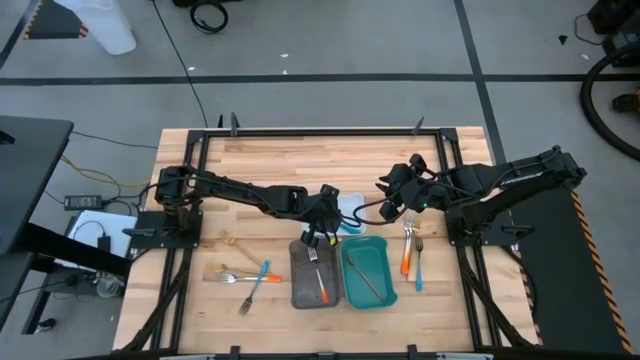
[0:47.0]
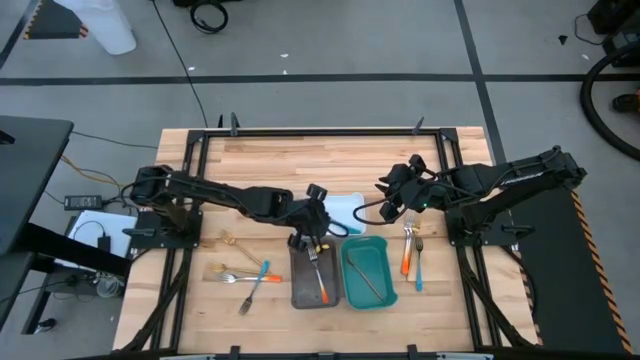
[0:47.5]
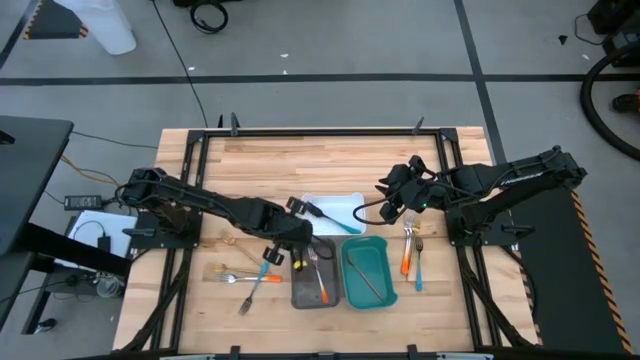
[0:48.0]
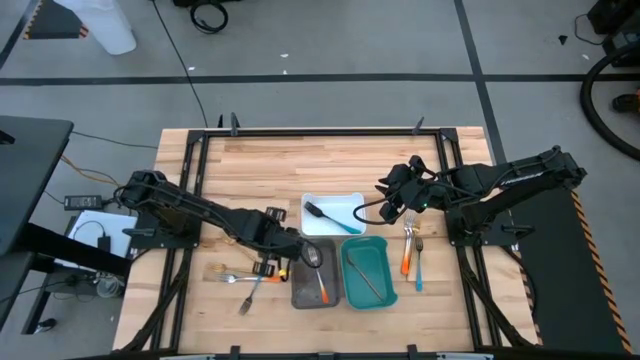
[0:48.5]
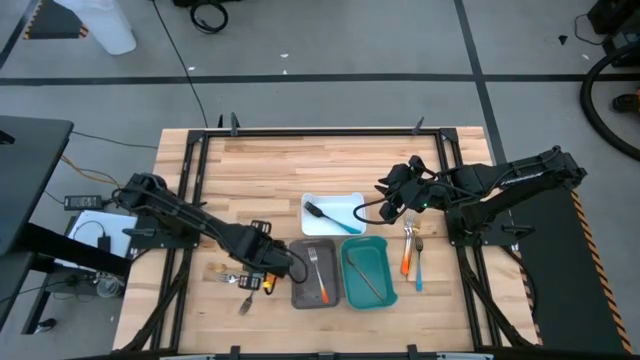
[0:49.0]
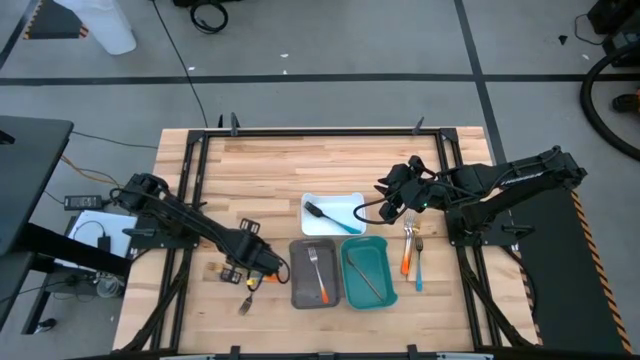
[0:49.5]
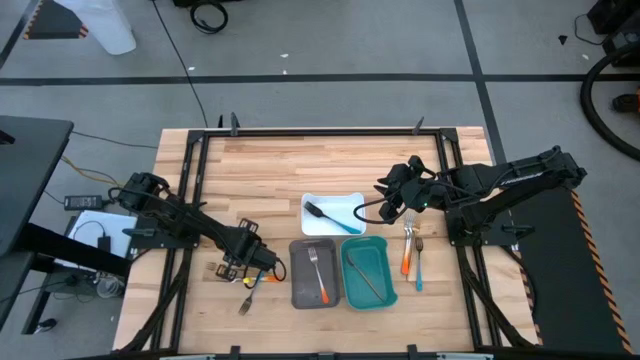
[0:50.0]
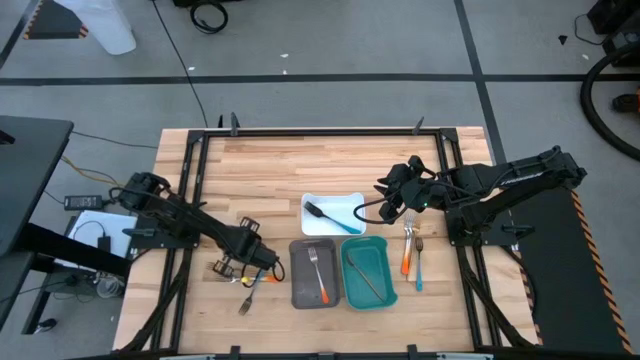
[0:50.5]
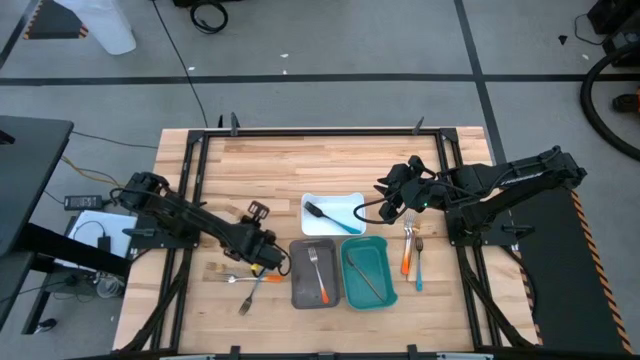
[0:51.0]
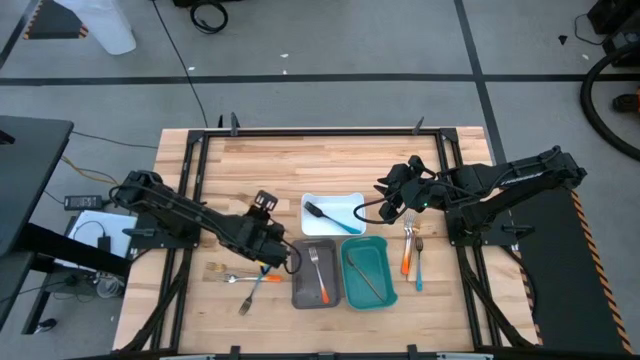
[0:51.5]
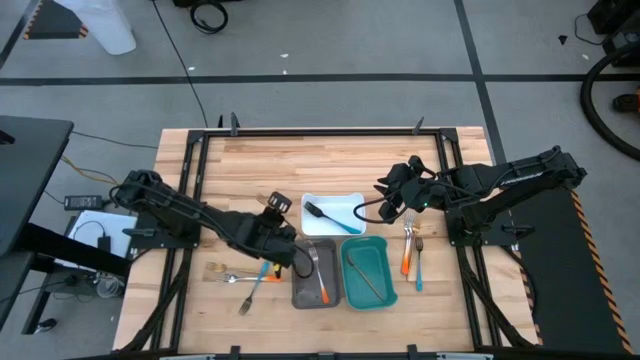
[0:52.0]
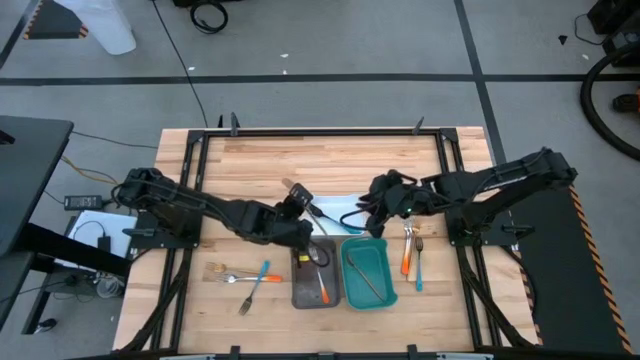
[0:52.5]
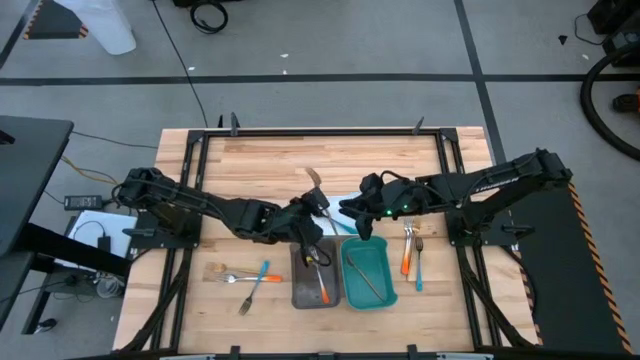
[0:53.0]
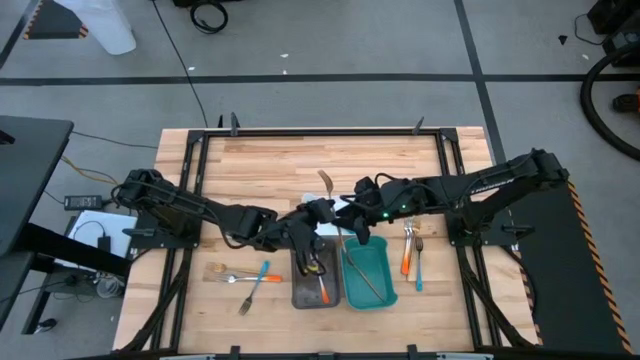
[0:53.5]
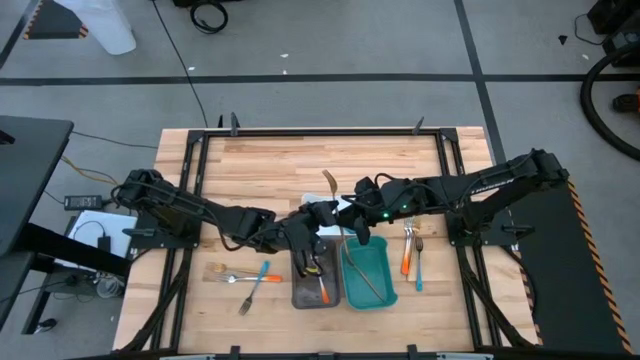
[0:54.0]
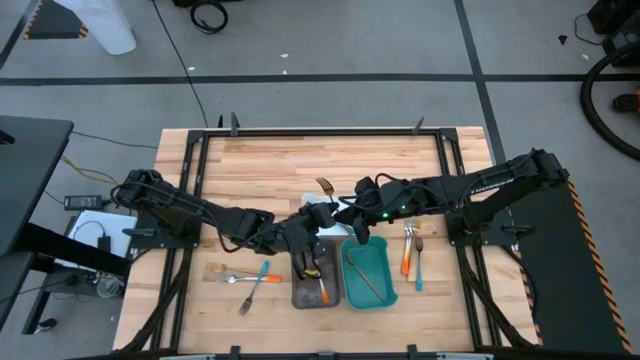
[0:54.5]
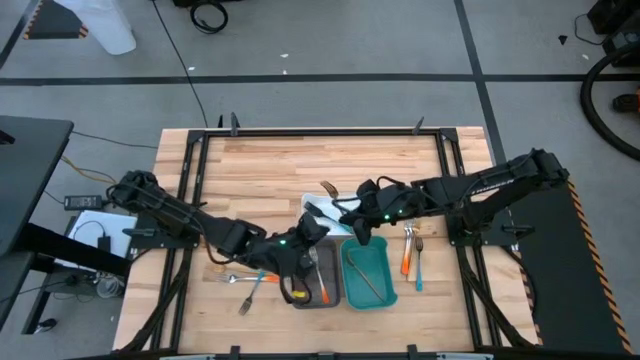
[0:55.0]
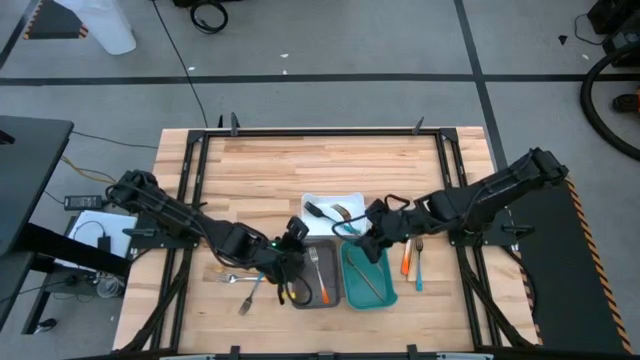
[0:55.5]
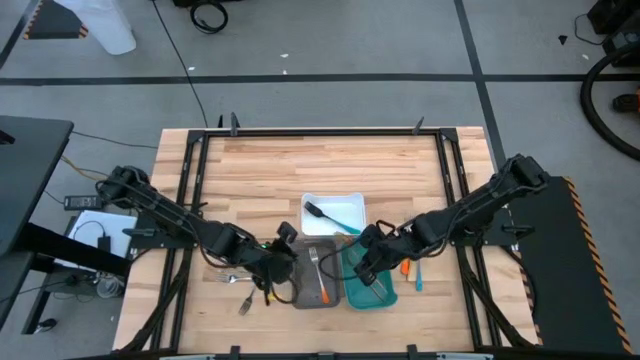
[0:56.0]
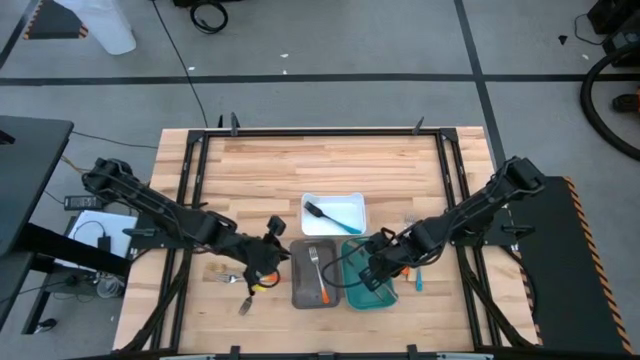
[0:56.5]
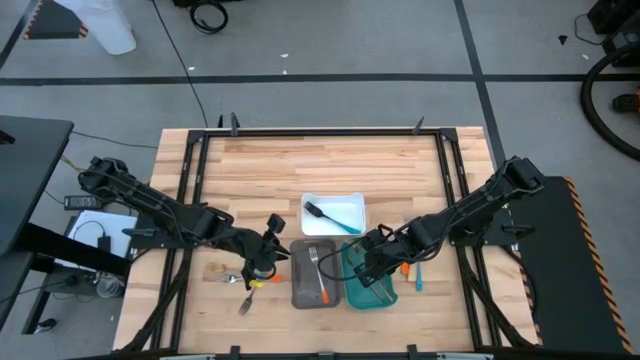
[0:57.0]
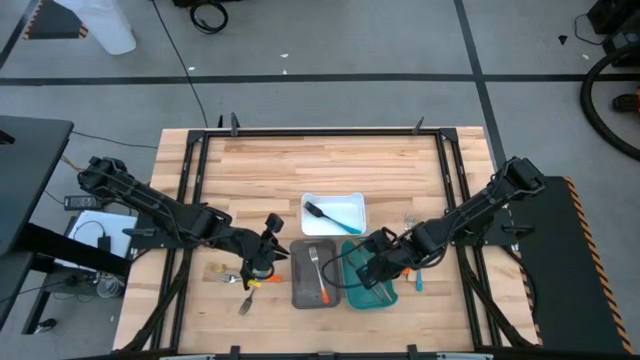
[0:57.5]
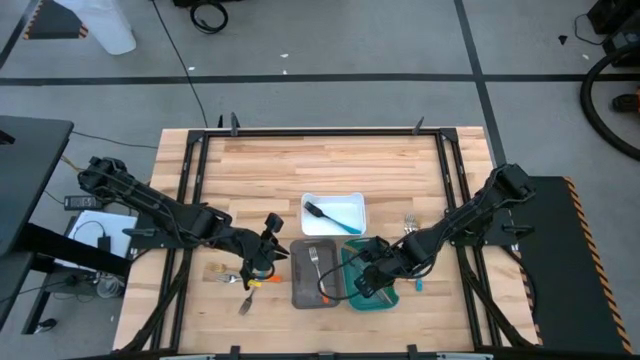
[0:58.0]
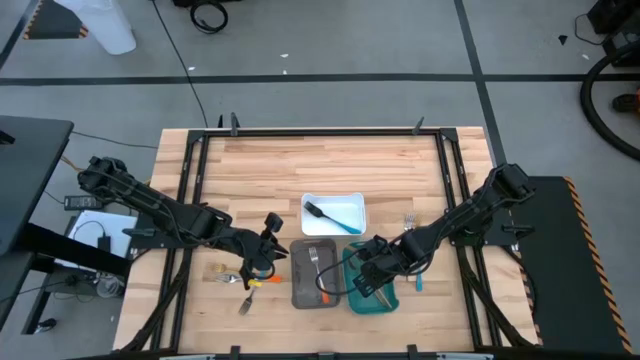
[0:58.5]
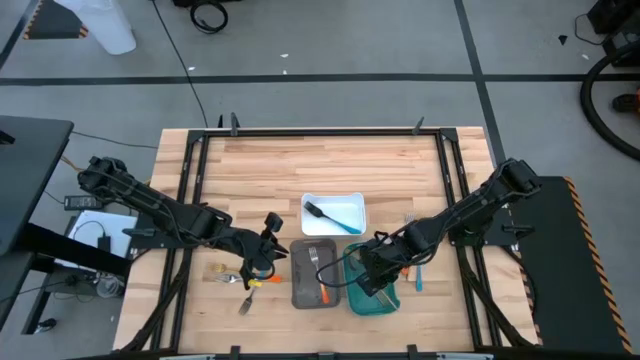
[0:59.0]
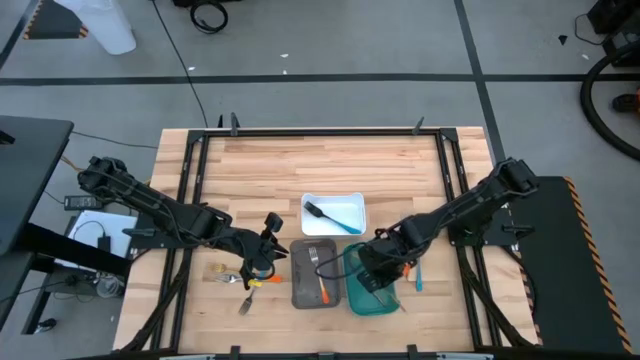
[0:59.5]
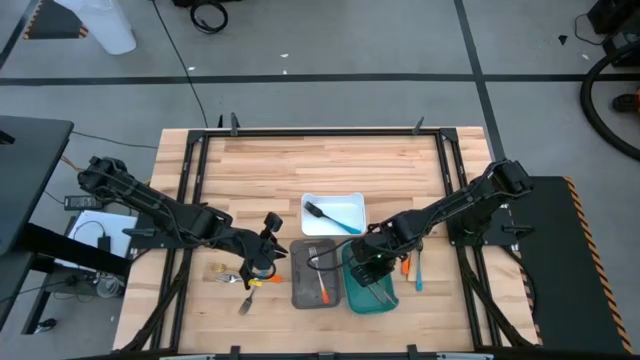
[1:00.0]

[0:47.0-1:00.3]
Task: Sort silverware by color (type)
Put the gold fork into the green bin

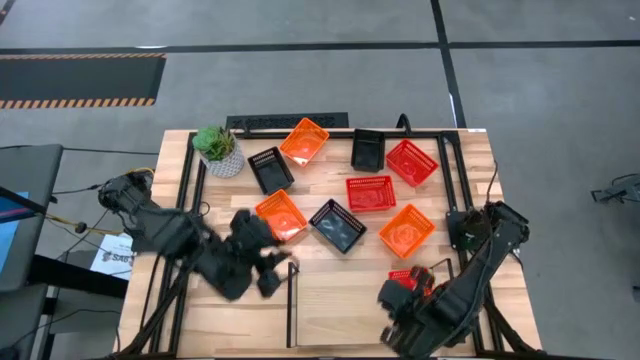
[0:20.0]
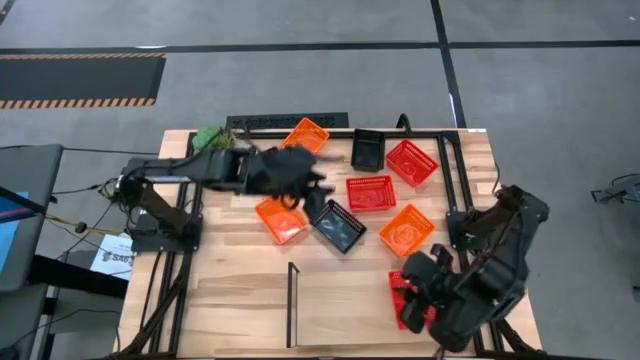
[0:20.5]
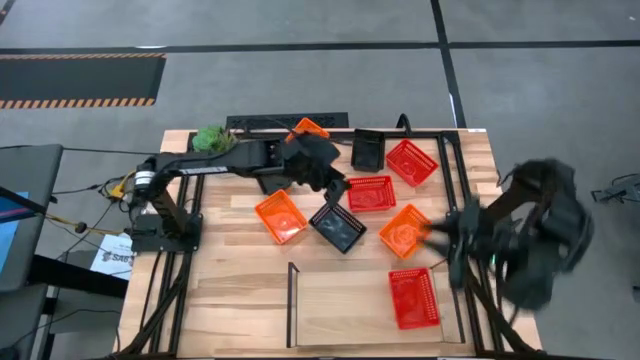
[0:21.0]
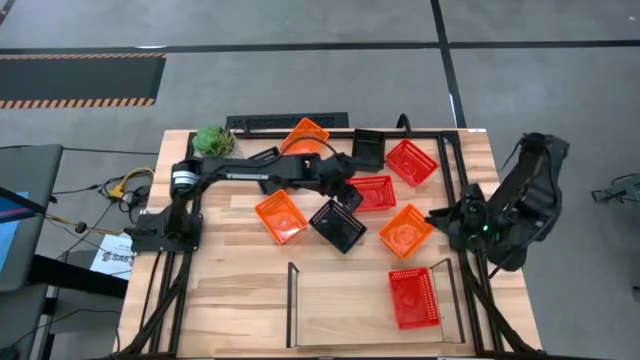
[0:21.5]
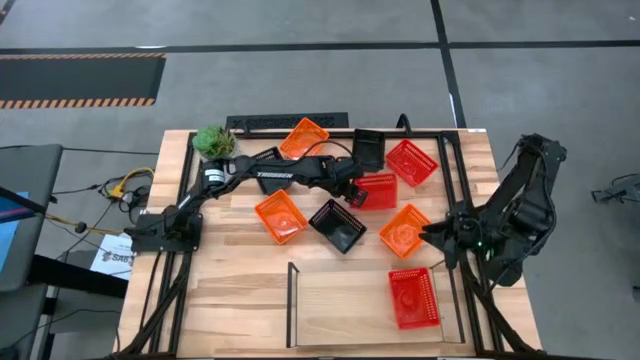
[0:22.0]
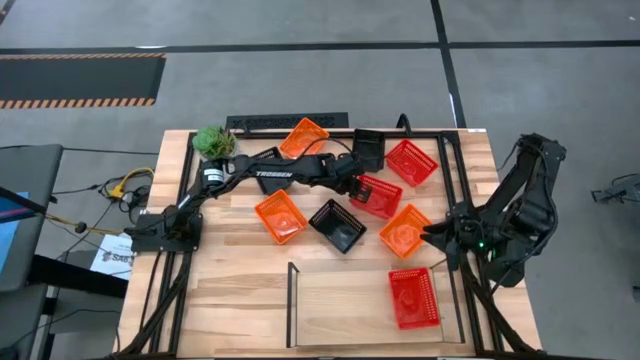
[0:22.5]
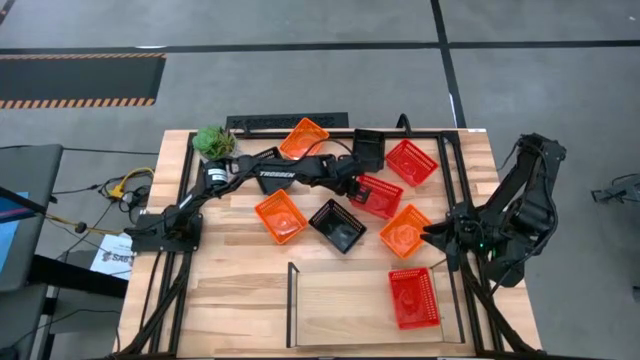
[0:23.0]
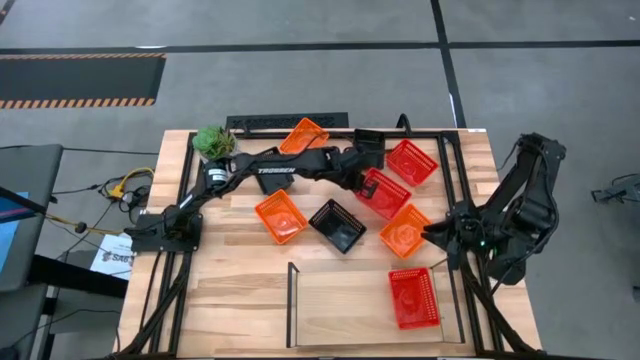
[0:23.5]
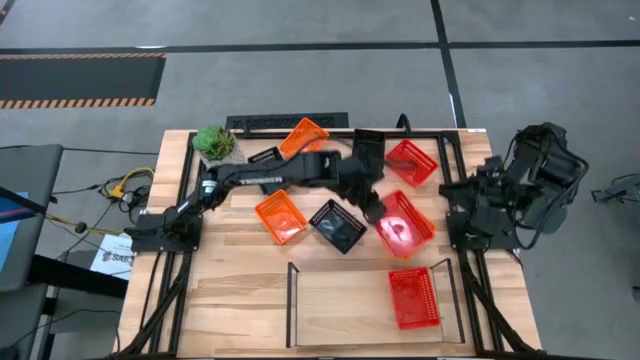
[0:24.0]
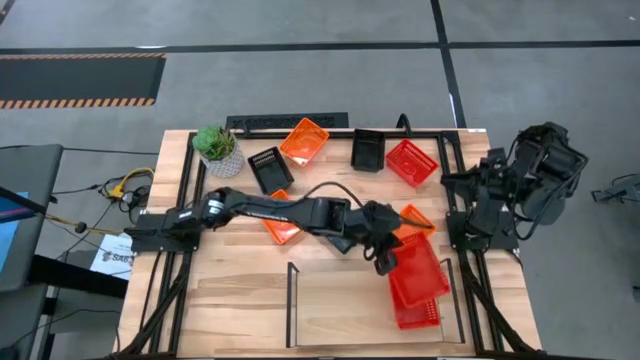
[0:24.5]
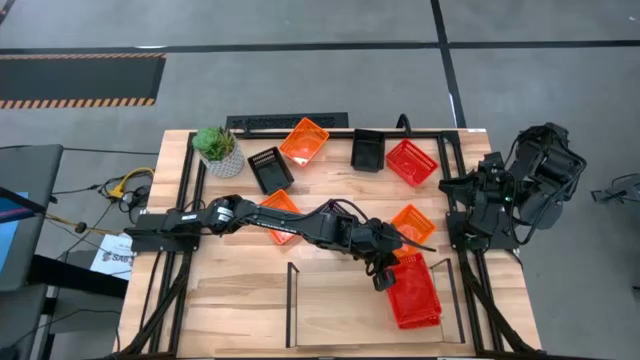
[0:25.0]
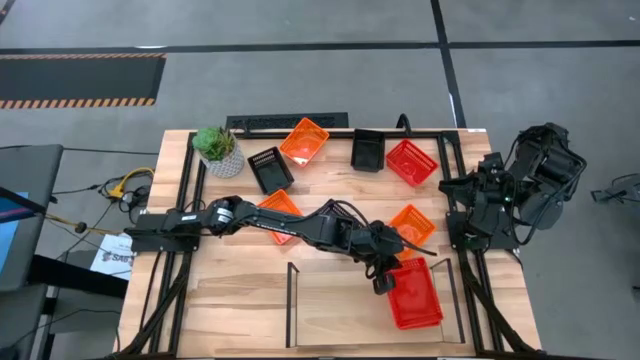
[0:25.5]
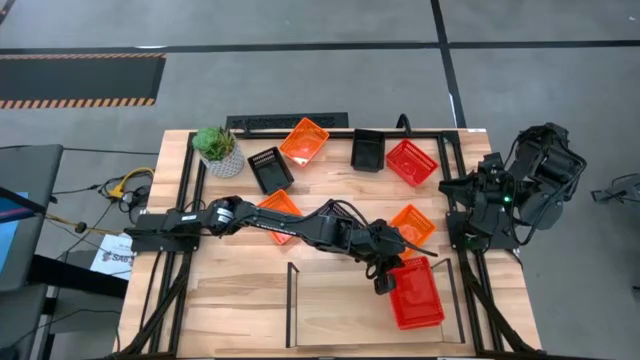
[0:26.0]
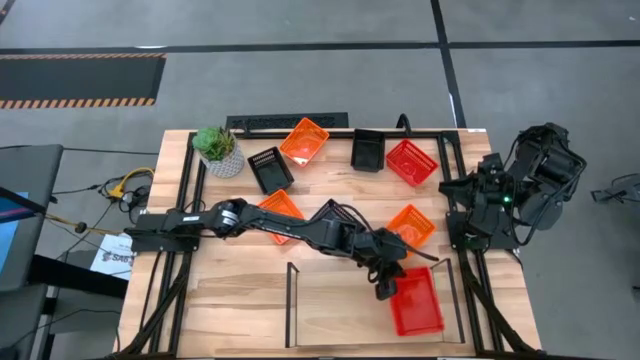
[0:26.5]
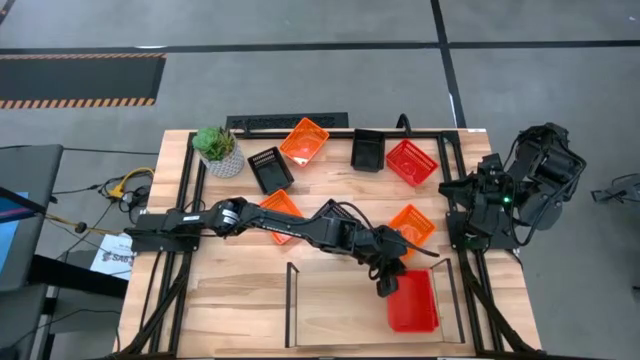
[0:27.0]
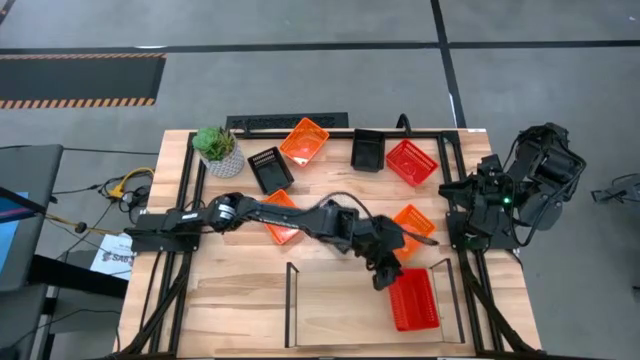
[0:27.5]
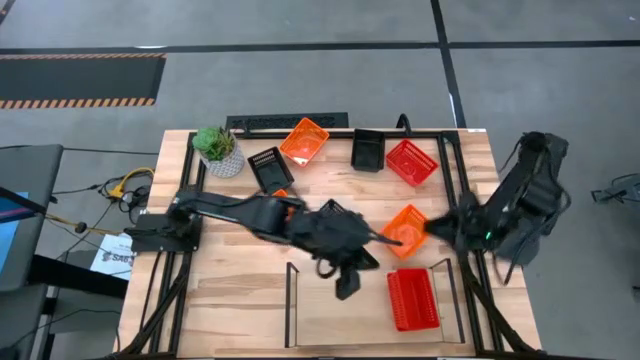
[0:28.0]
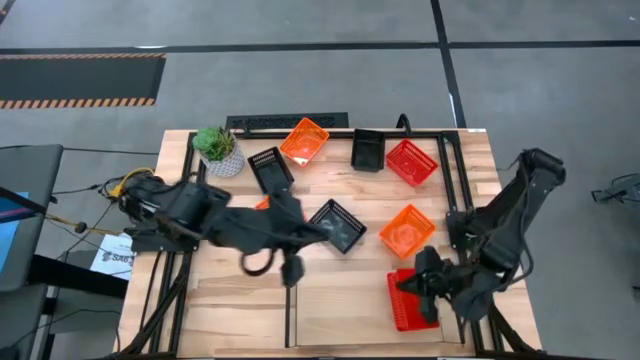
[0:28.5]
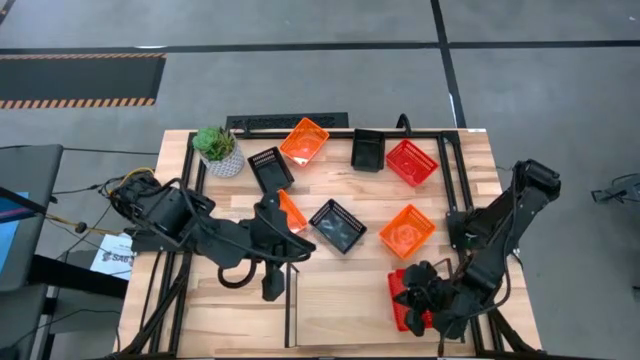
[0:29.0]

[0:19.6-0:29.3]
Task: Stack baskets on shelf by color
Stack the bottom red bin on top of the red bin on the shelf
